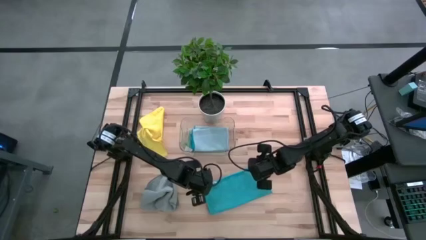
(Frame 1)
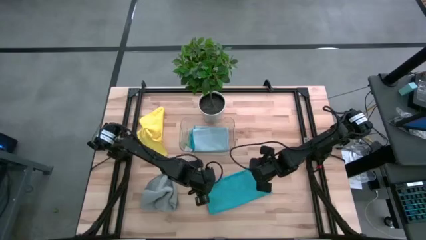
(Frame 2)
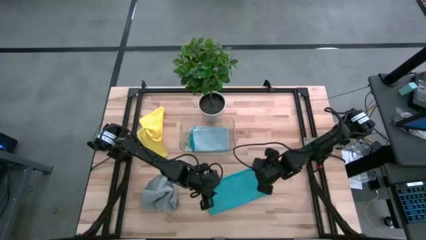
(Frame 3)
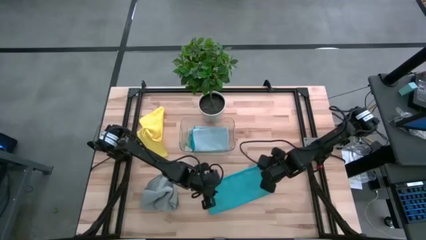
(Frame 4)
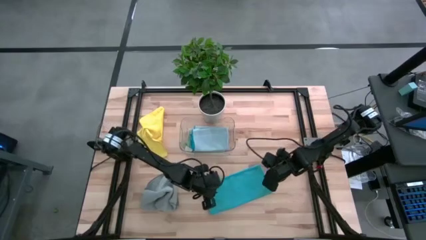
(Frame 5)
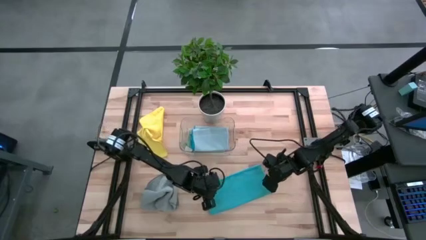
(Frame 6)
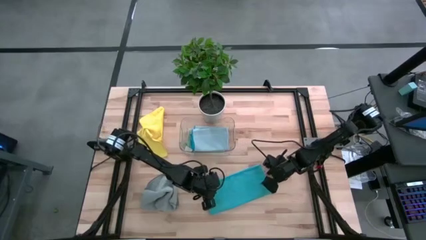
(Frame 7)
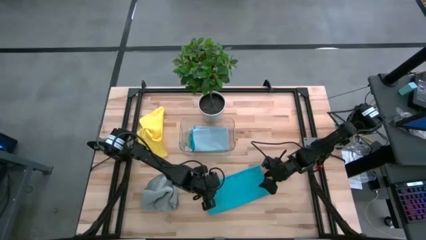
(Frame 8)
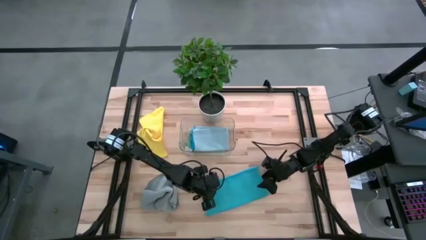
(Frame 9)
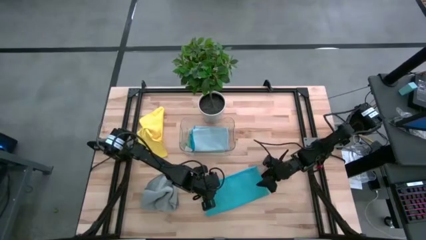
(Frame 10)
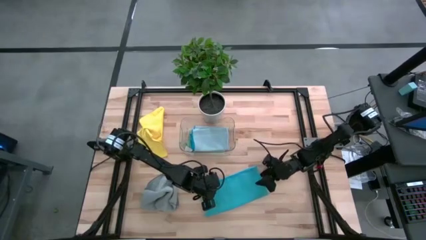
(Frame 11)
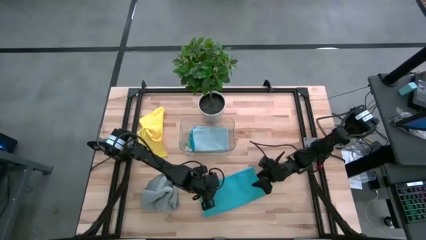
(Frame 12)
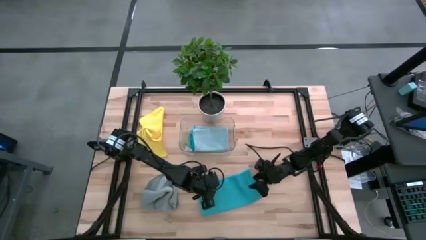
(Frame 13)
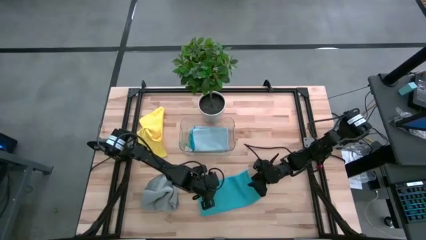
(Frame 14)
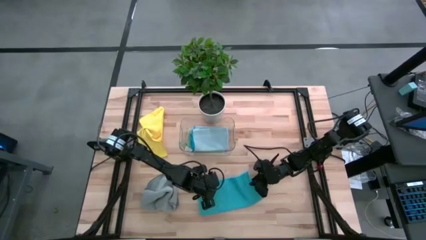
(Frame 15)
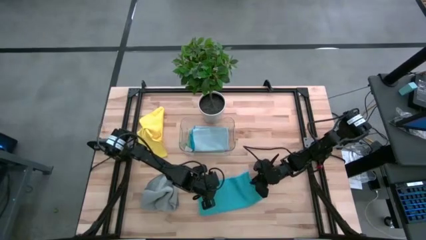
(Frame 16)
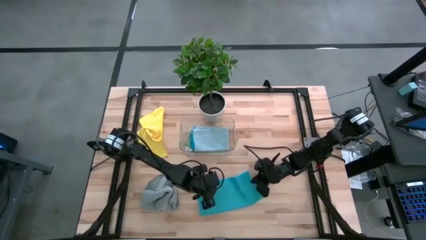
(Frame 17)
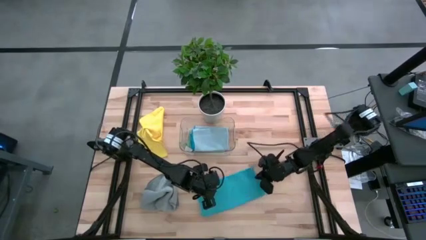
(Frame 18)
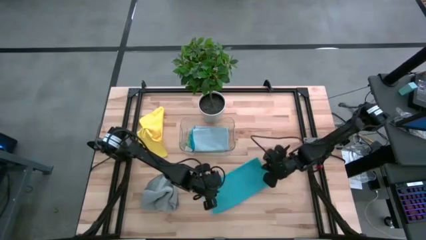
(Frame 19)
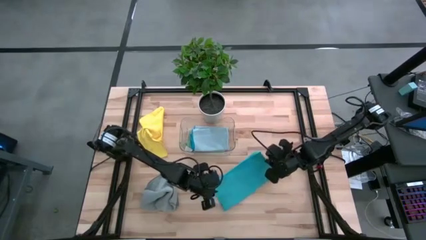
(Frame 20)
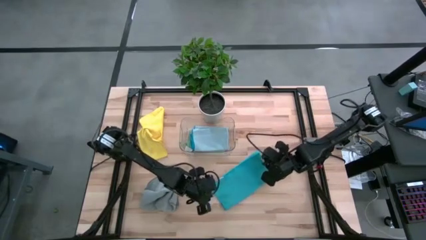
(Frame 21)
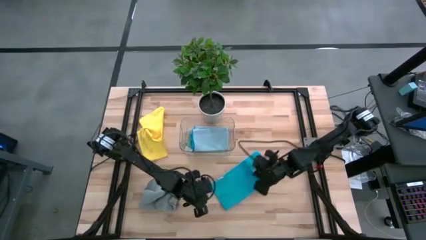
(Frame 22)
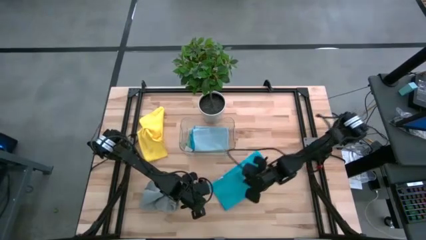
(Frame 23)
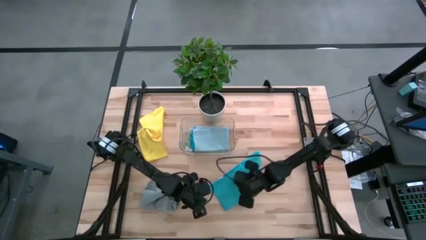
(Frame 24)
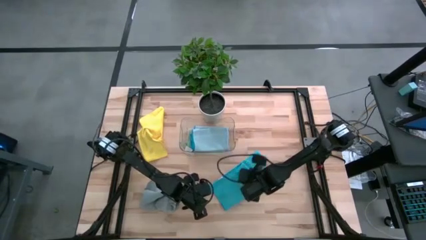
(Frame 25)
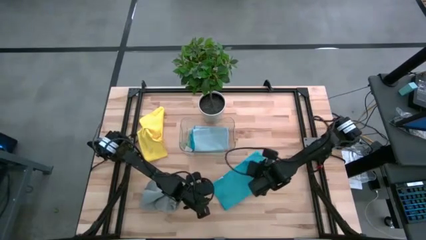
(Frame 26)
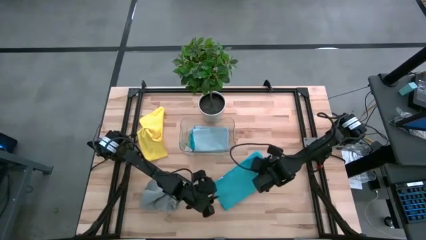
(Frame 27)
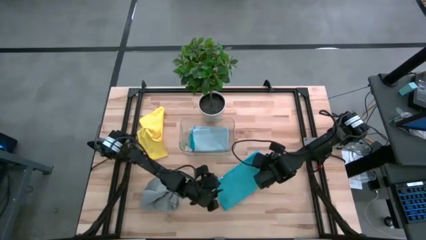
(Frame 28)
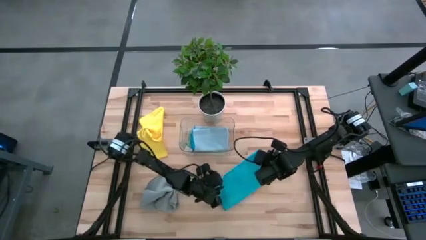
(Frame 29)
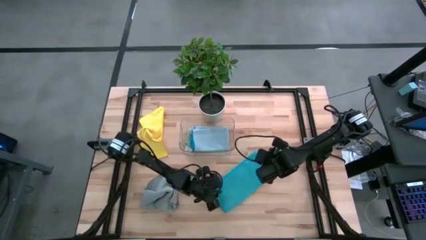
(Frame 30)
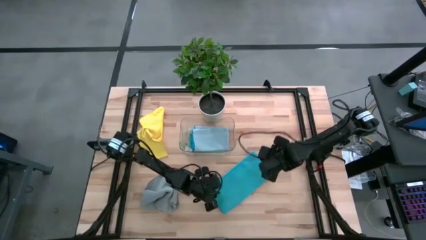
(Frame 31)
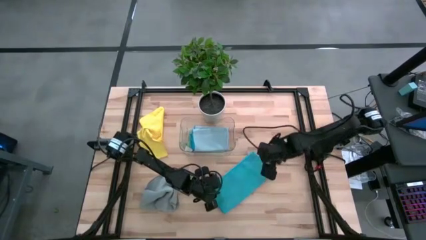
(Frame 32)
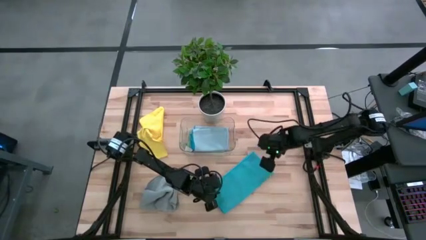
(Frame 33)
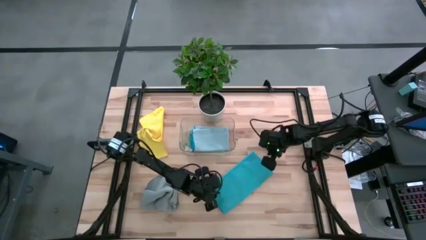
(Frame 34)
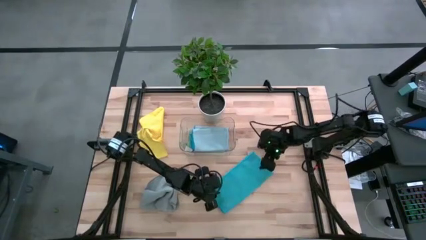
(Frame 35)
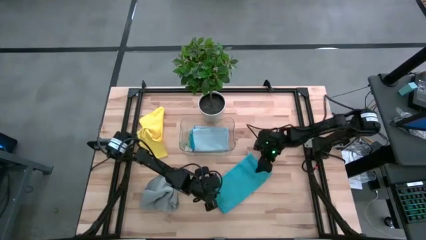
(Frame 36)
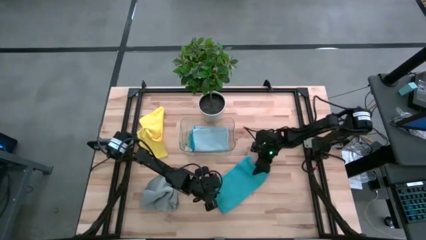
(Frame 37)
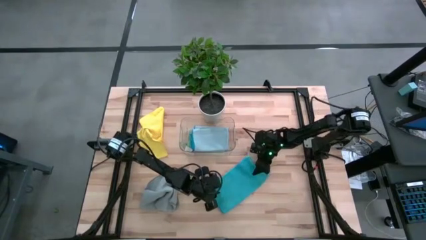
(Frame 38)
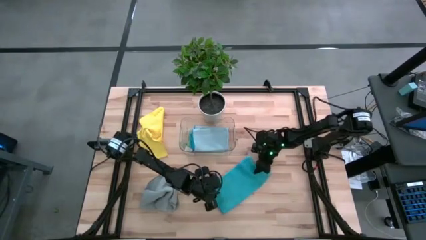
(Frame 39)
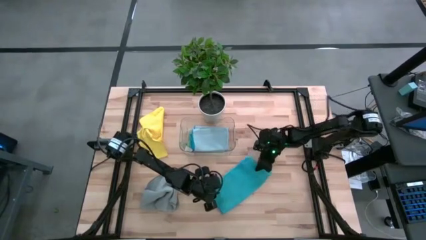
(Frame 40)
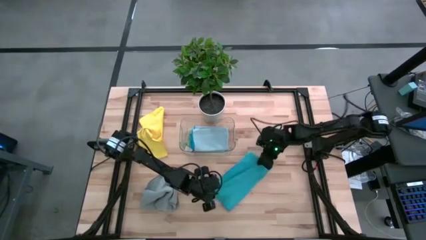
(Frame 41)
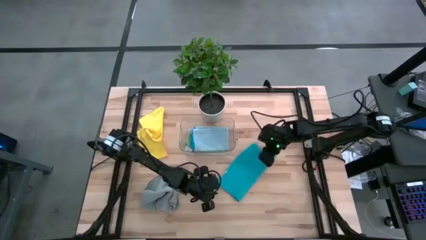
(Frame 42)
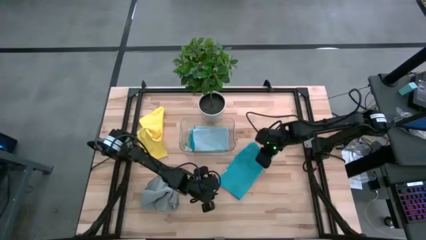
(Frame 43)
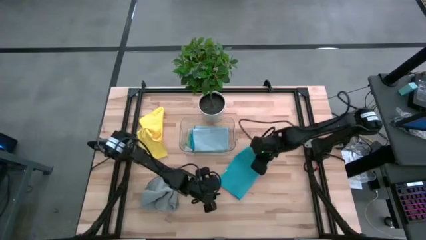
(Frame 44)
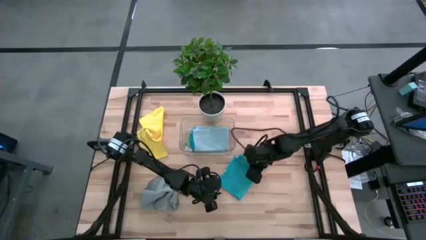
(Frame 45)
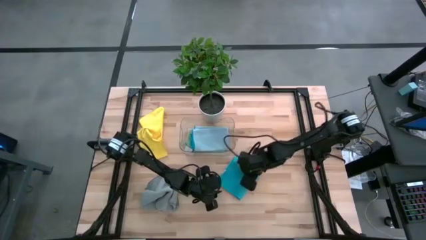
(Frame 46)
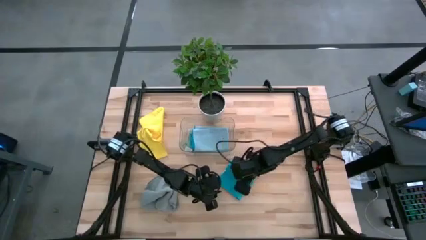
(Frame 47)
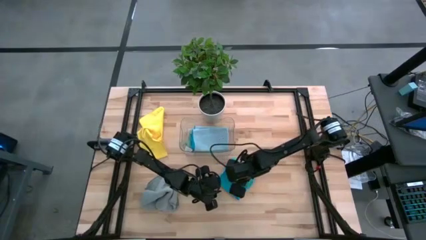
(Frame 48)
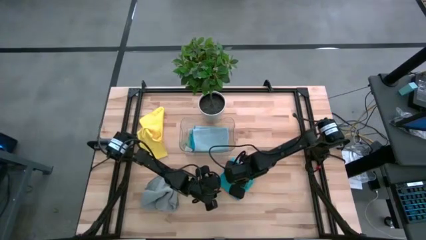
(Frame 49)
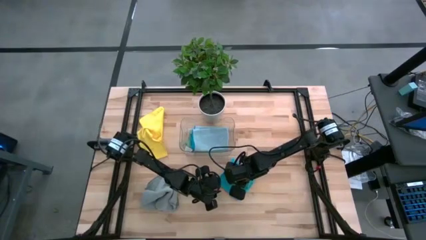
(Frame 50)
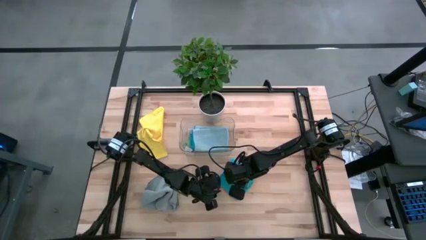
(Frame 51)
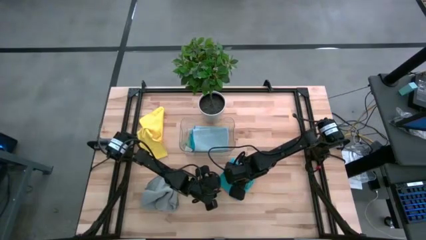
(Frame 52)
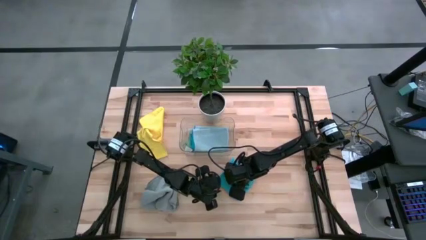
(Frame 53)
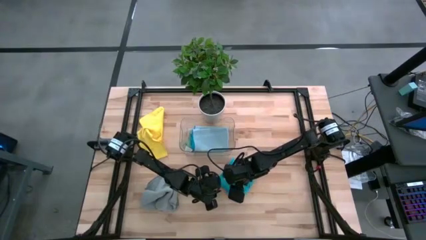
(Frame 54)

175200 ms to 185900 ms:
Task: Fold microfiber towels
Fold the blue microfiber cloth
